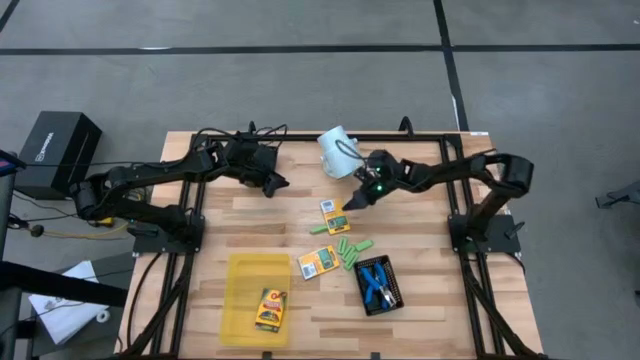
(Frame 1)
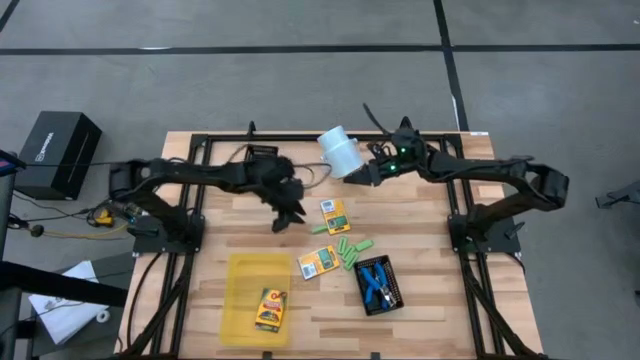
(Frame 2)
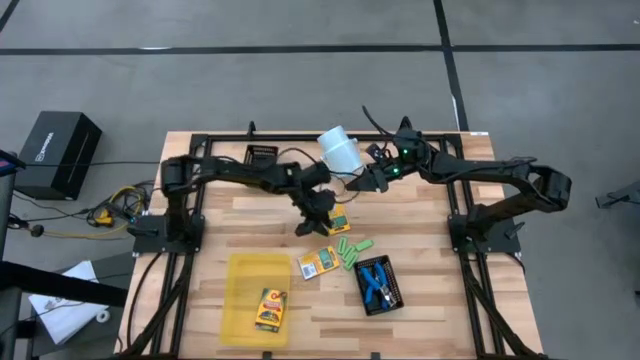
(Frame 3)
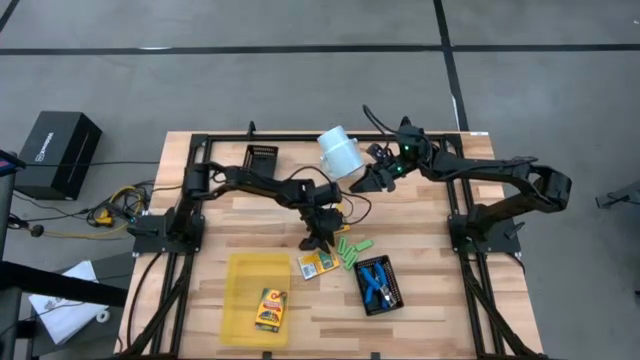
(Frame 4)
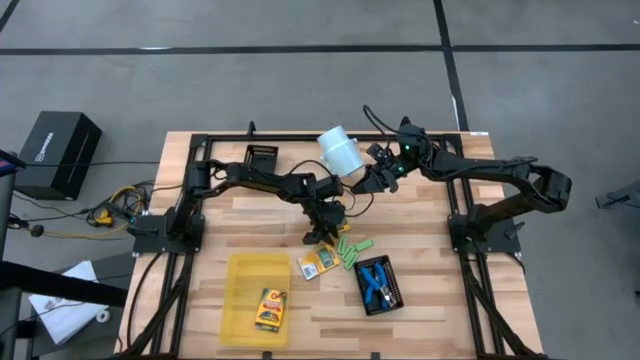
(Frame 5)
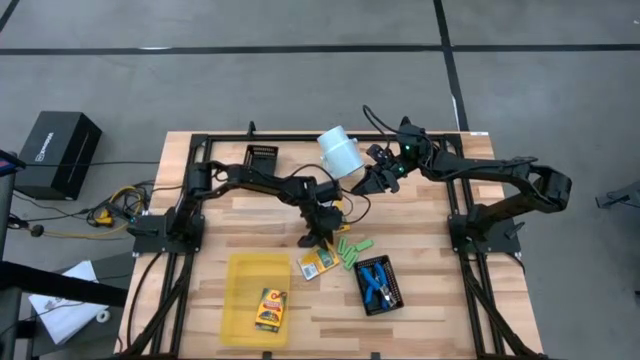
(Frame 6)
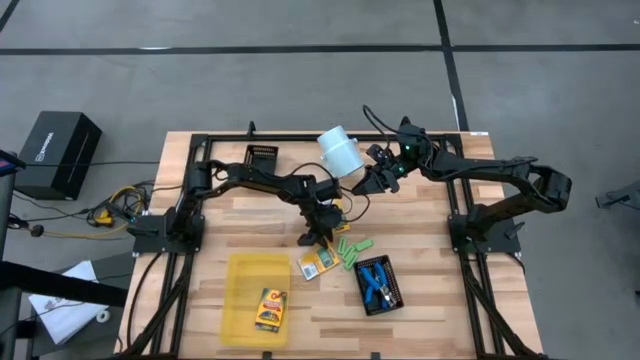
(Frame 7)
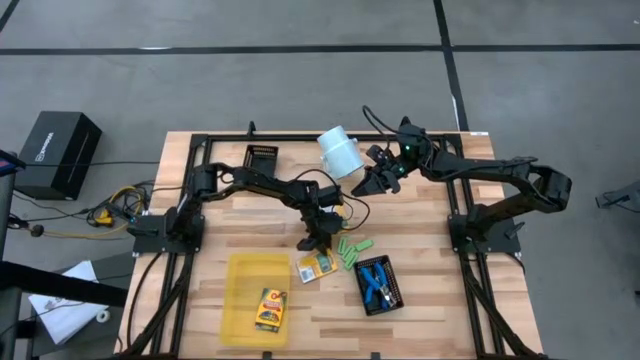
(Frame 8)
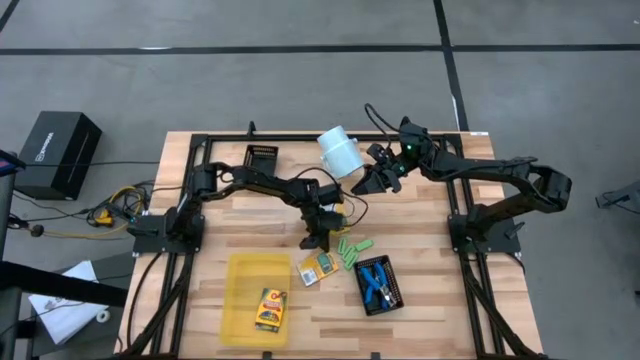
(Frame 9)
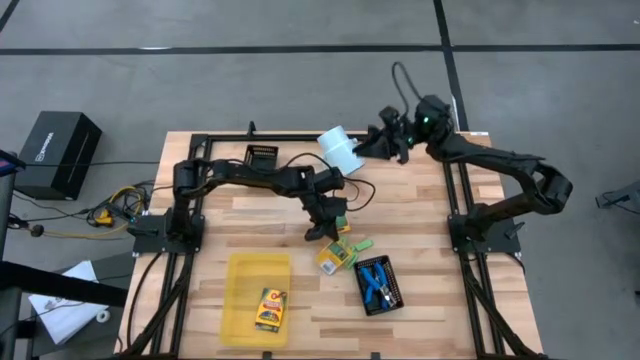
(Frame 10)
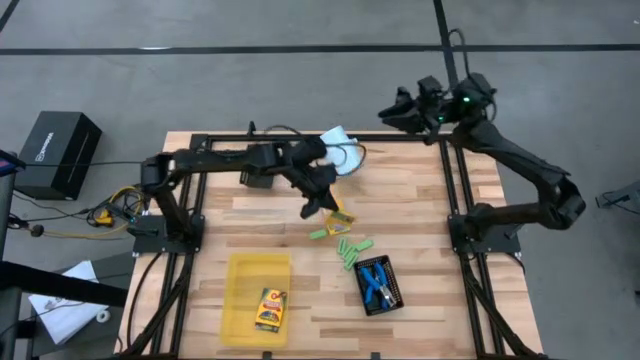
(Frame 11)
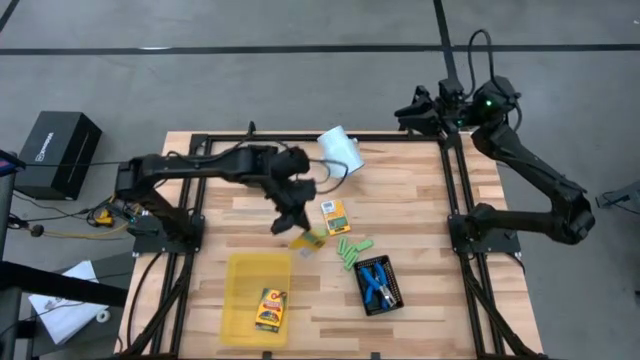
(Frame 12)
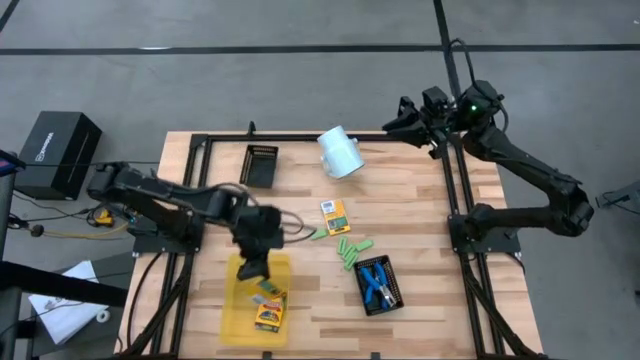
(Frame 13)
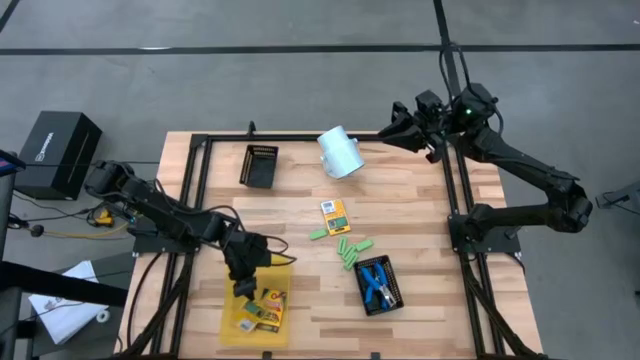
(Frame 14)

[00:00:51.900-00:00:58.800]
Task: Pick & Place School Supplies
Put the yellow crayon box into the yellow bin

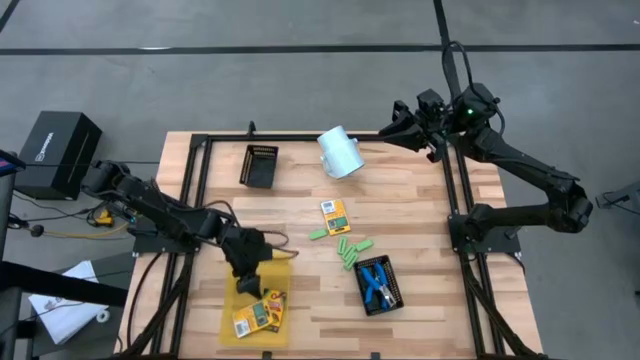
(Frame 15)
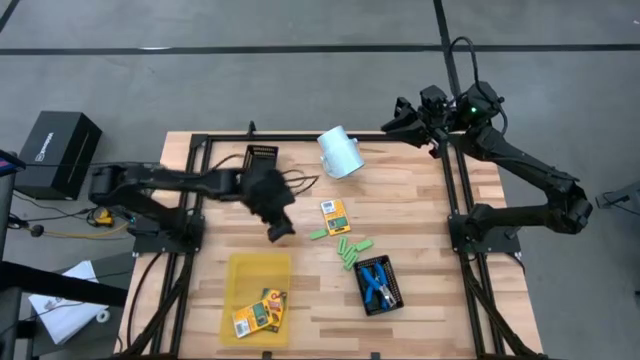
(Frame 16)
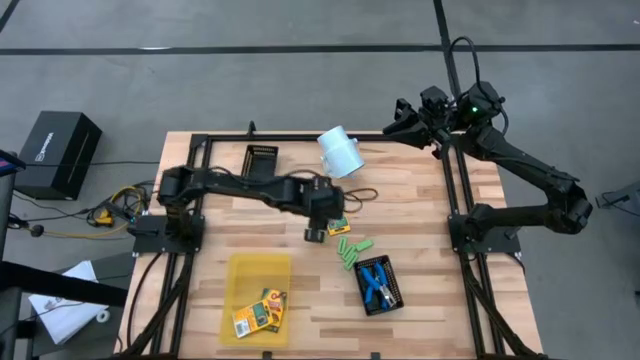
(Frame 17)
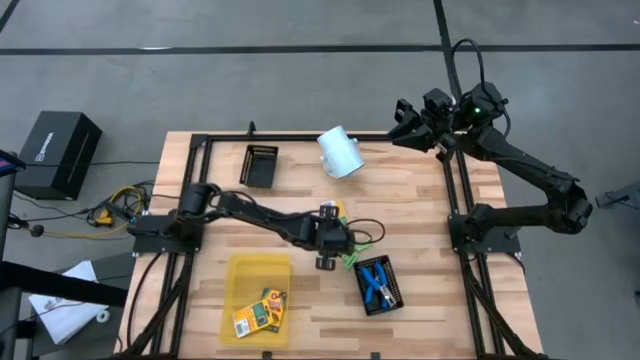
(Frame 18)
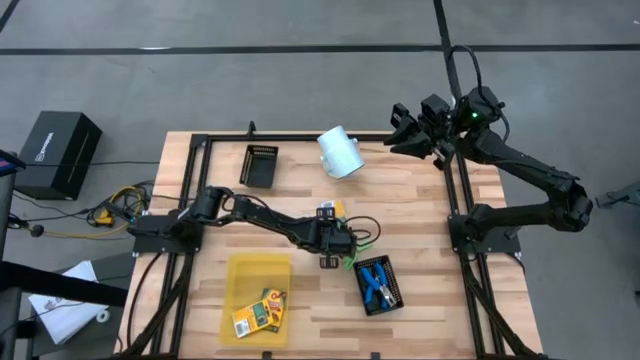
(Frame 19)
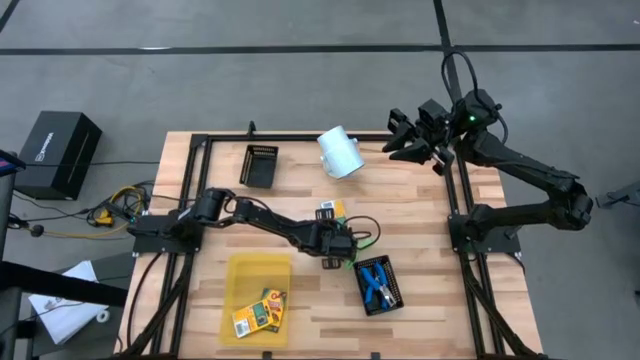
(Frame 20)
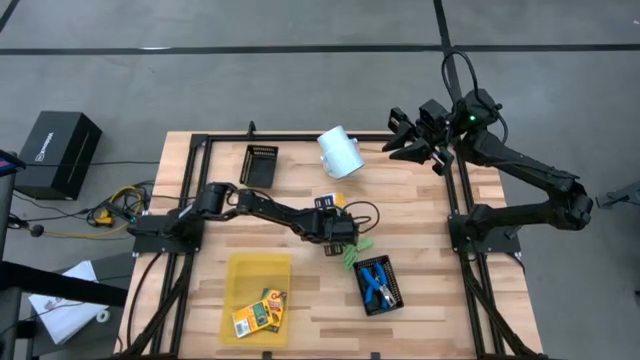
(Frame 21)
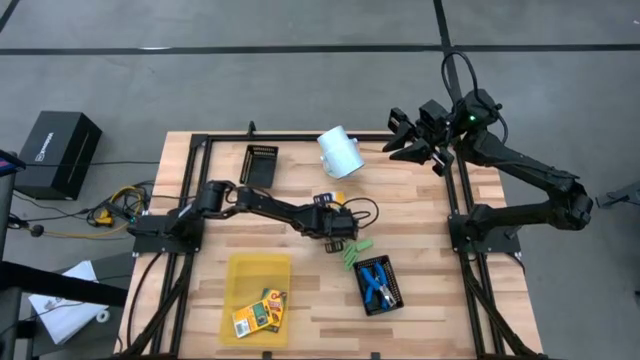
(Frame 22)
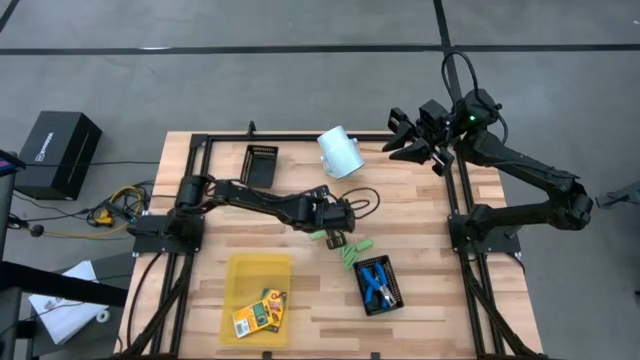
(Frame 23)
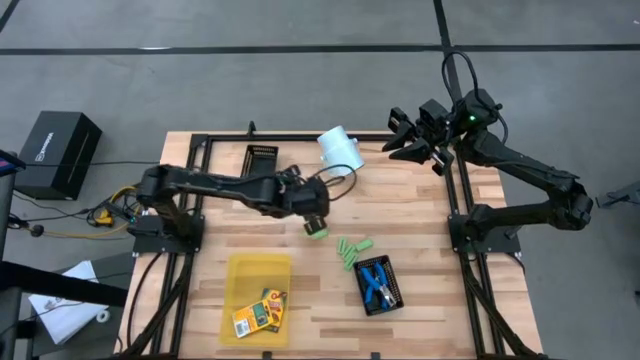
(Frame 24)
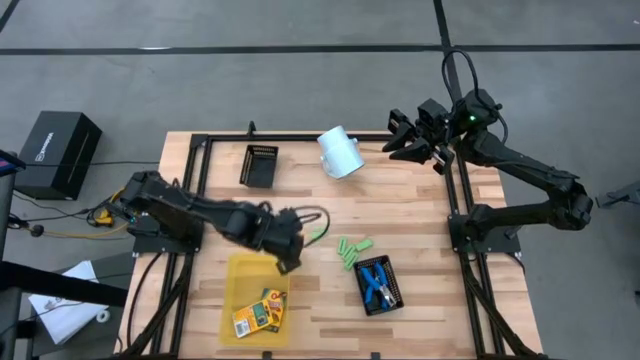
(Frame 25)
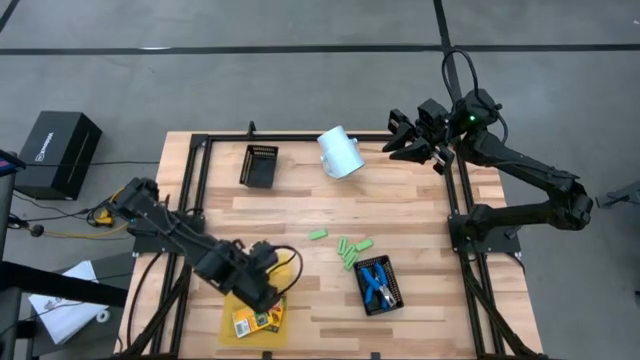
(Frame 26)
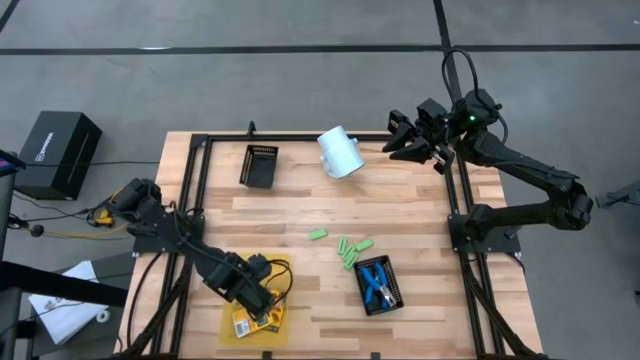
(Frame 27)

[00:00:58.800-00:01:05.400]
Put the yellow crayon box into the yellow bin

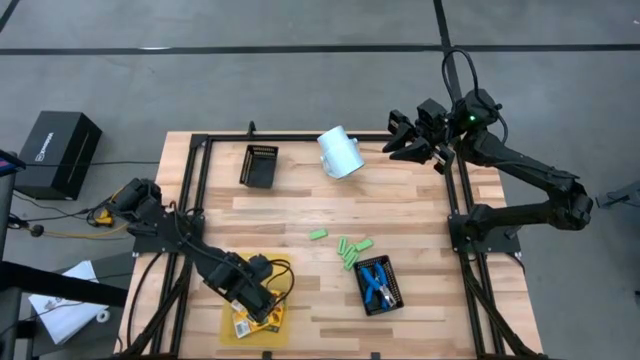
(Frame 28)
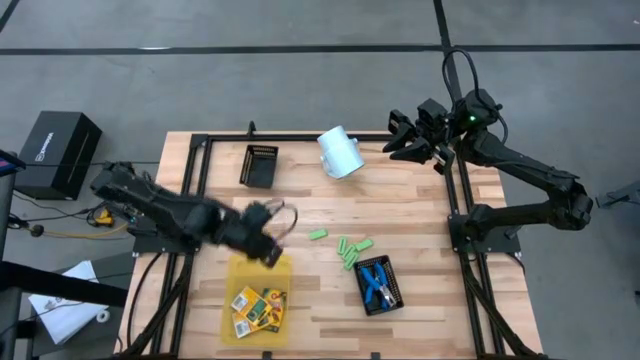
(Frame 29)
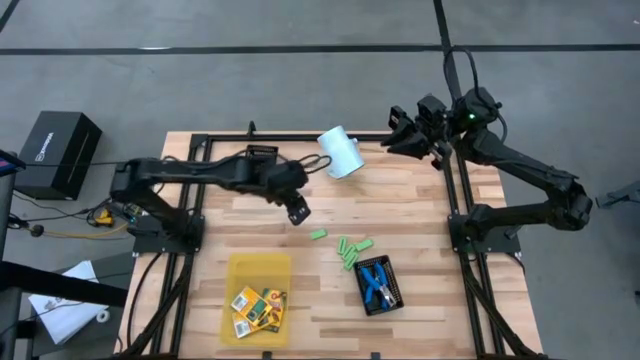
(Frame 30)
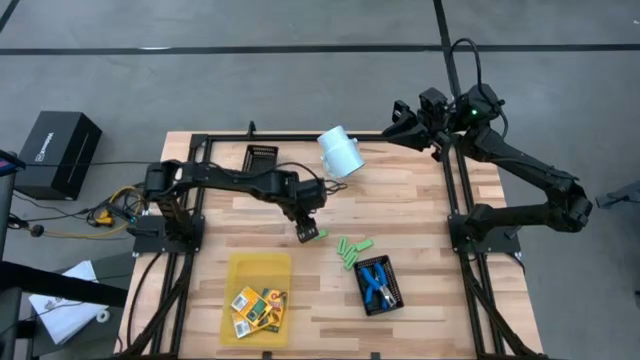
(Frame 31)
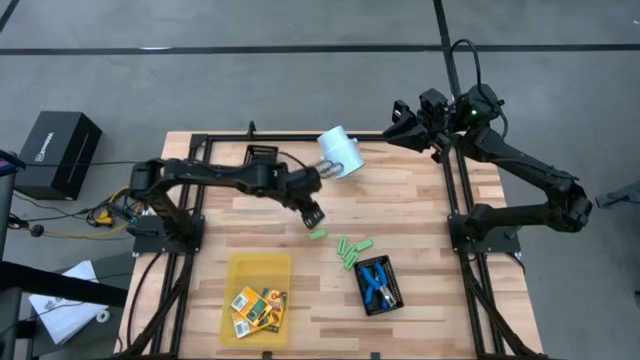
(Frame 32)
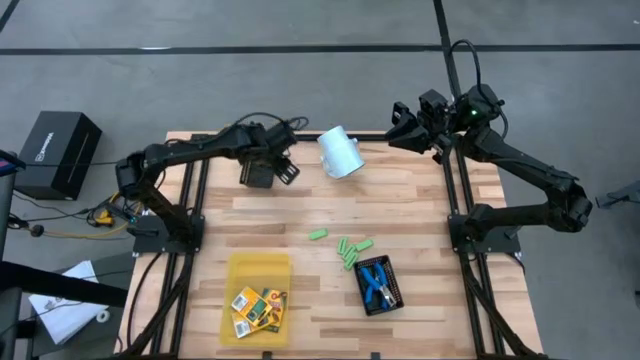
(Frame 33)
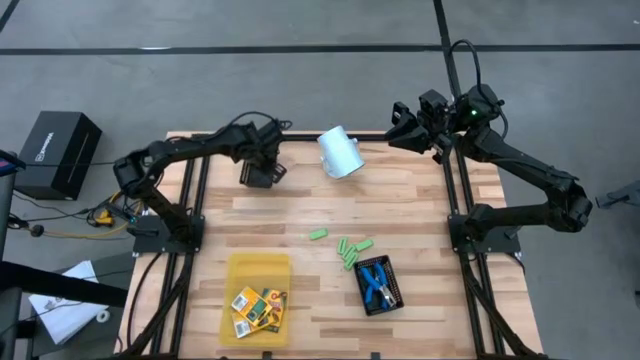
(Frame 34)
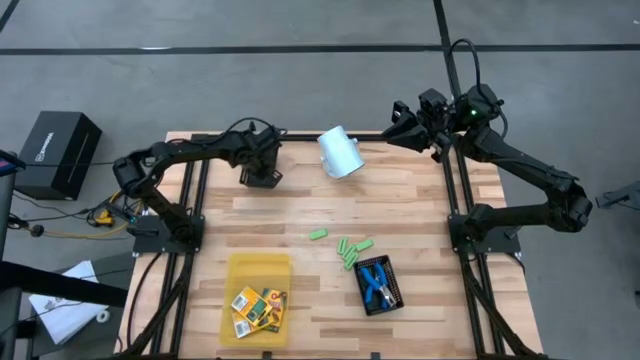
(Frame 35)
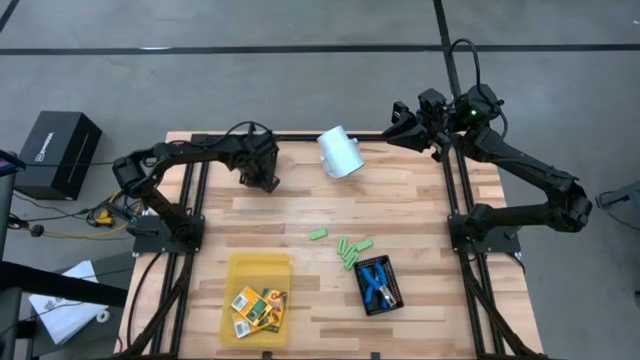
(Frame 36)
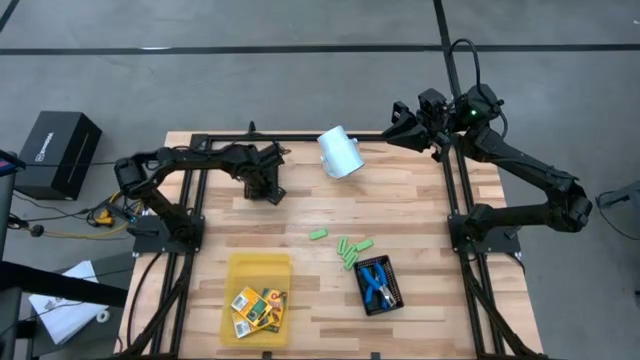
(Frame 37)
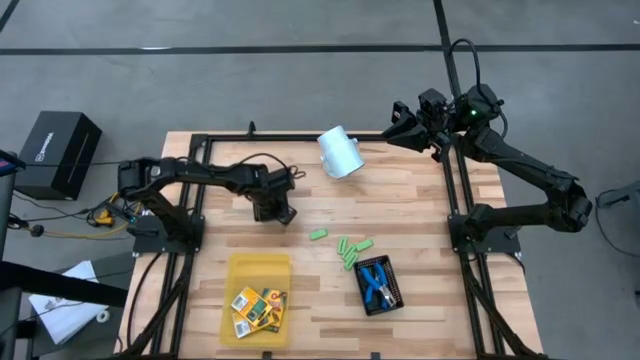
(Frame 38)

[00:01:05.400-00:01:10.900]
Adjust the top black bin

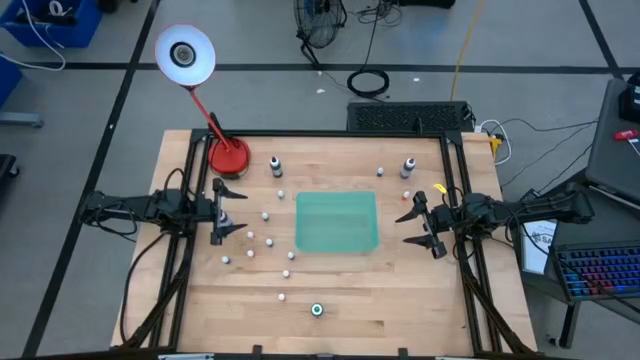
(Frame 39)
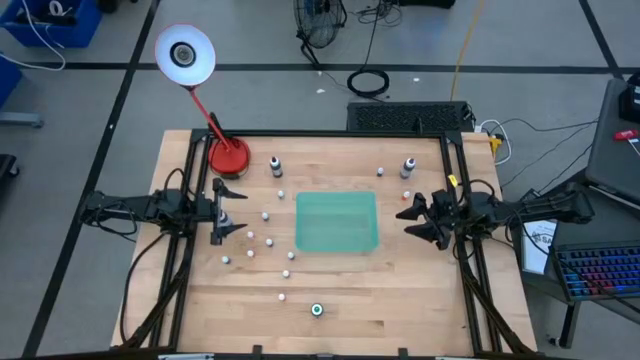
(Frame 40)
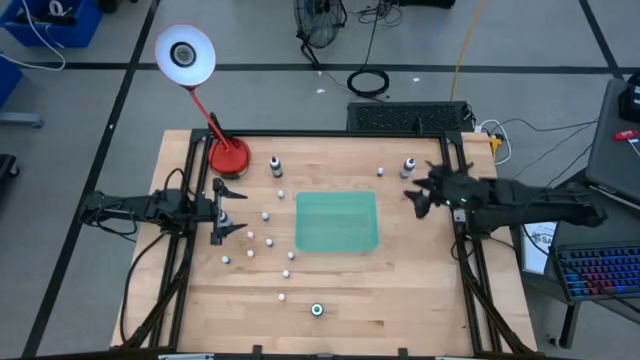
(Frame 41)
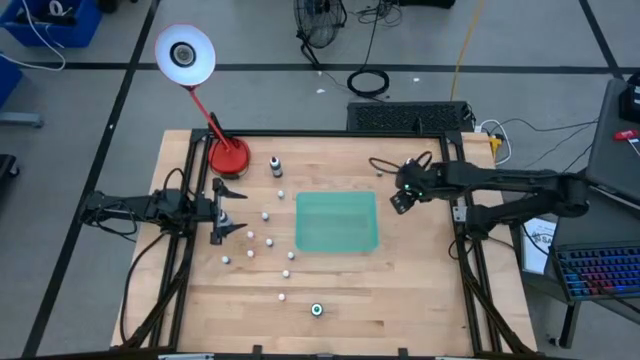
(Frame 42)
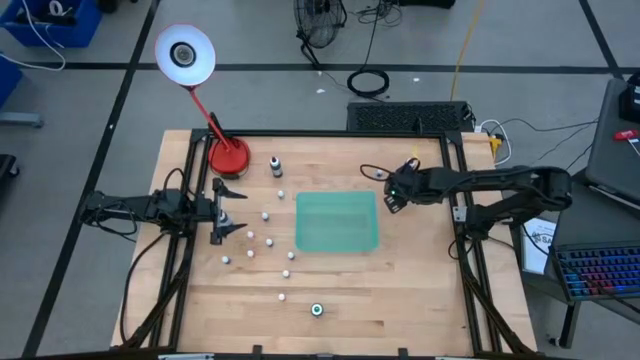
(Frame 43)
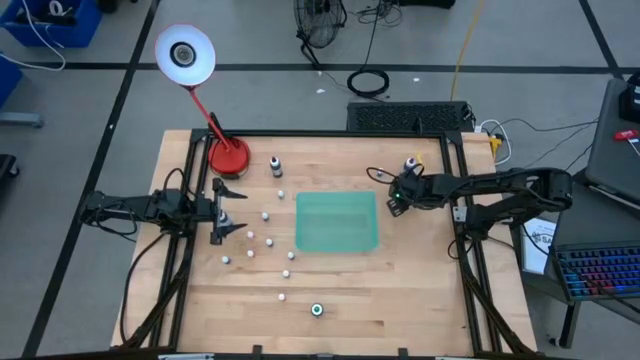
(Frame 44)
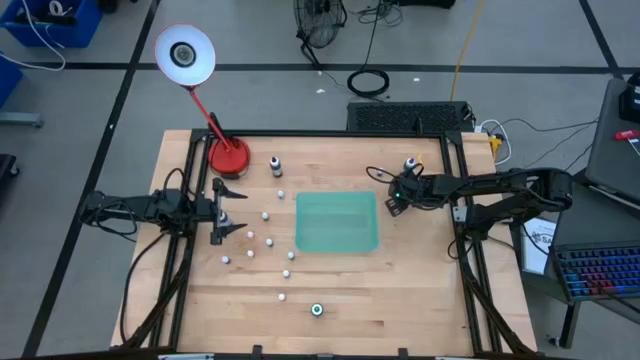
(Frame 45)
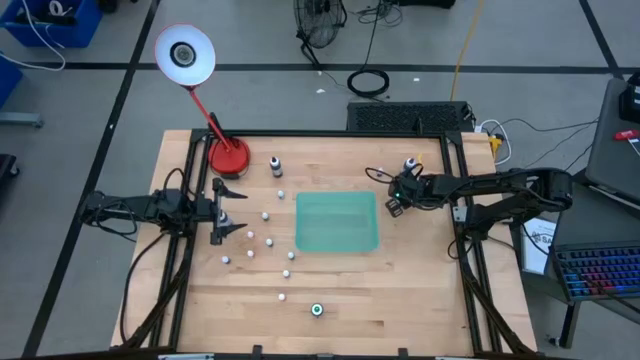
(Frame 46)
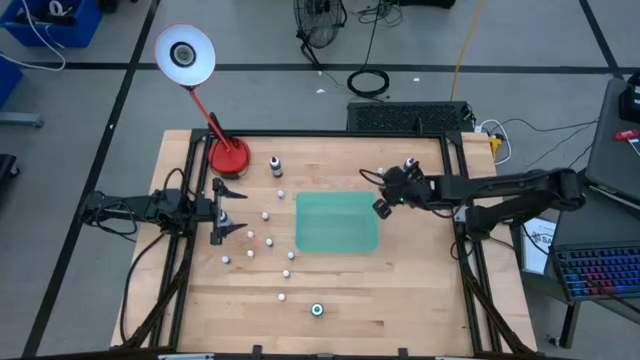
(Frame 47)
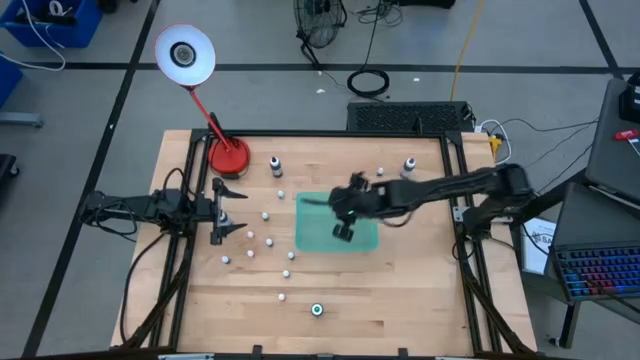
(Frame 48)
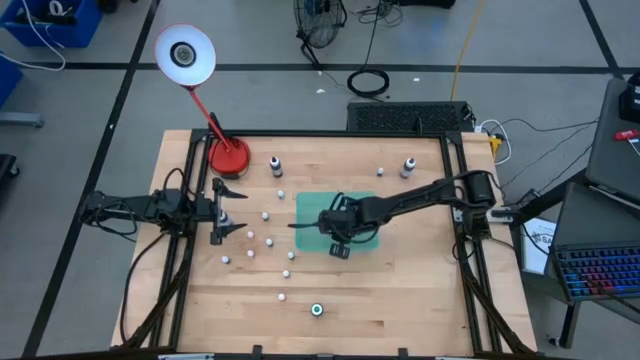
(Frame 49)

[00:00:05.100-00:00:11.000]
Task: Pick & Place food coloring
Put the small orange food coloring bottle into the blue bin
